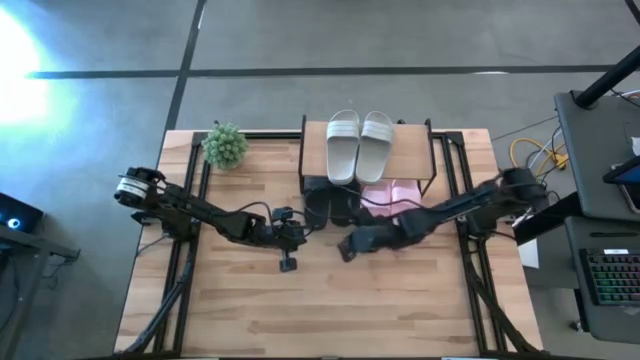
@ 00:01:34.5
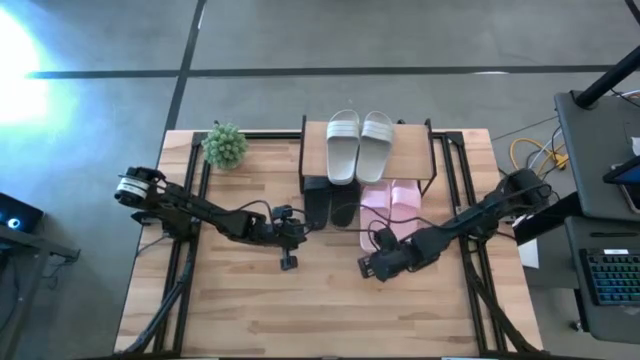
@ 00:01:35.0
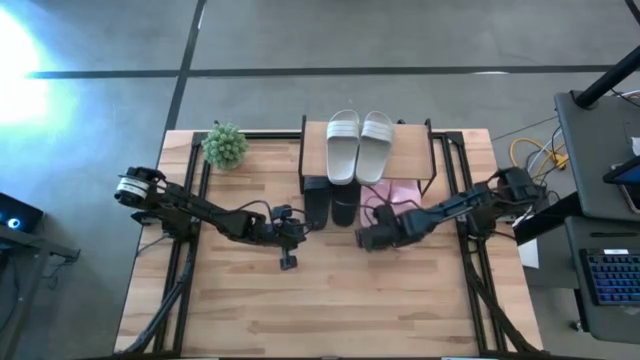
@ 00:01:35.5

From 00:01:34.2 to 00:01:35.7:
Task: Pick and place slides into the shelf
Adjust the left pink slipper under the shelf

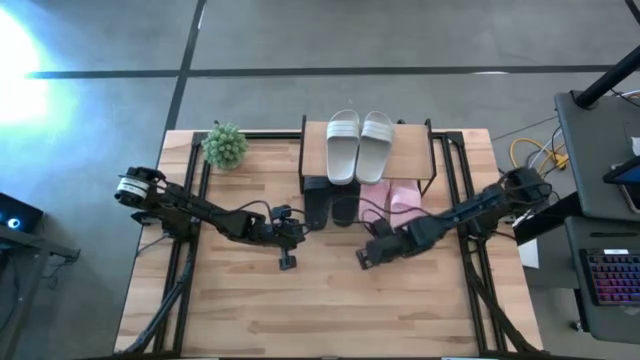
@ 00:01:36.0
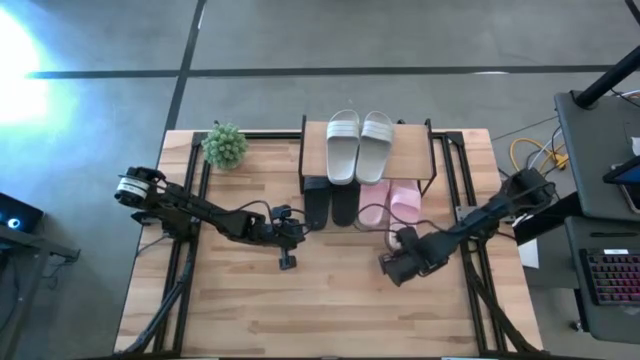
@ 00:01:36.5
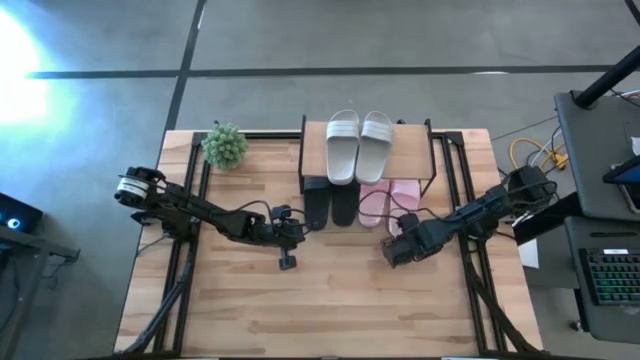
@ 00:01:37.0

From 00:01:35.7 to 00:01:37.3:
Adjust the right pink slipper under the shelf

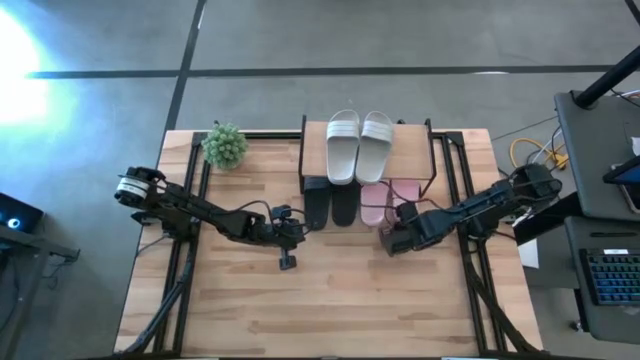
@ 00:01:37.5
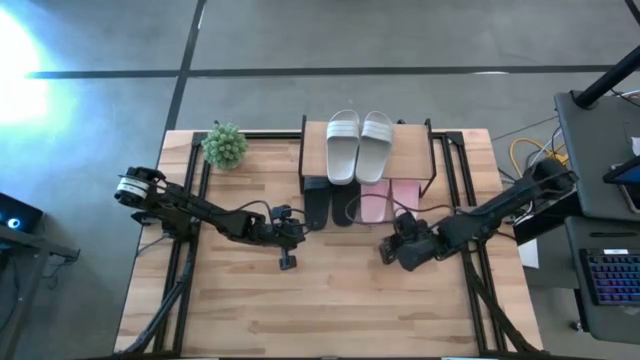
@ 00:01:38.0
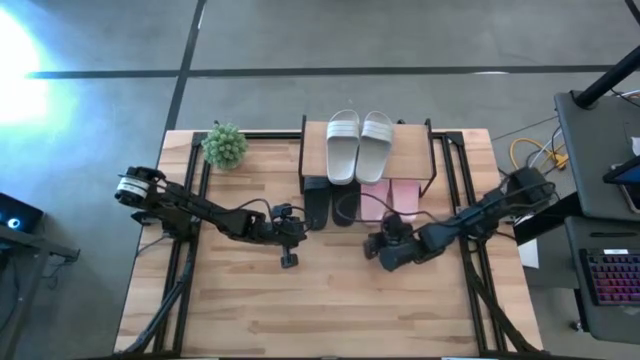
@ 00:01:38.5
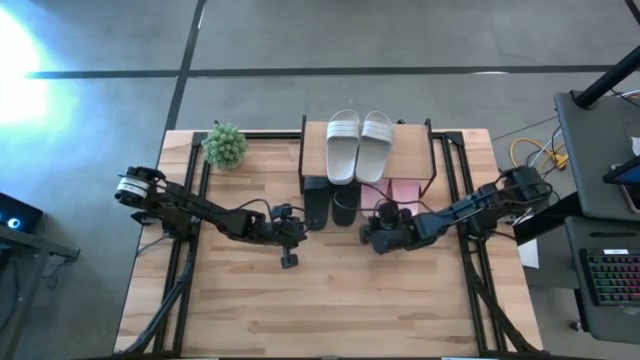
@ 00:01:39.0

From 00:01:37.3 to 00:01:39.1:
Adjust the left pink slipper under the shelf

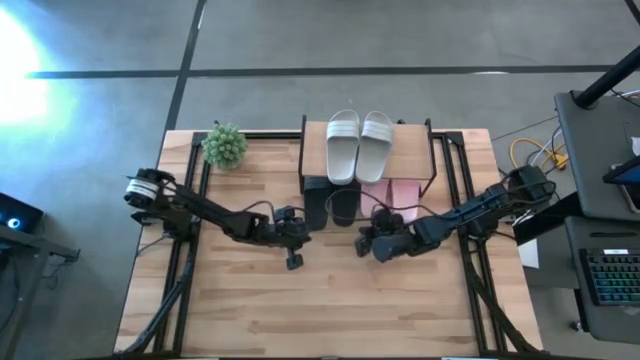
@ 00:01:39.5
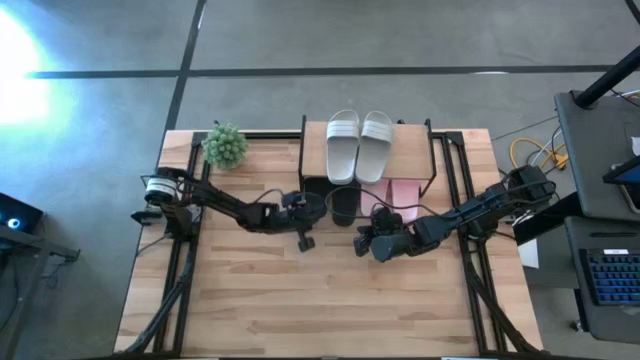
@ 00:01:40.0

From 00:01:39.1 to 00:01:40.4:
Adjust the left black slipper under the shelf

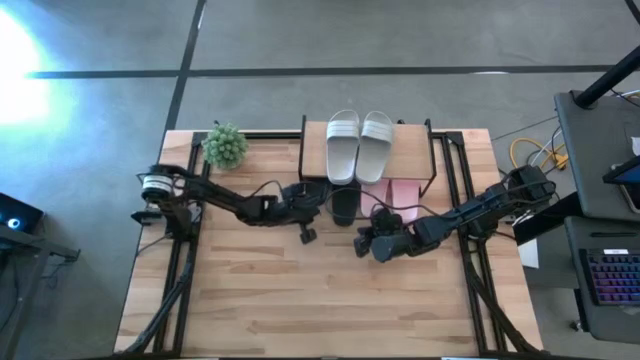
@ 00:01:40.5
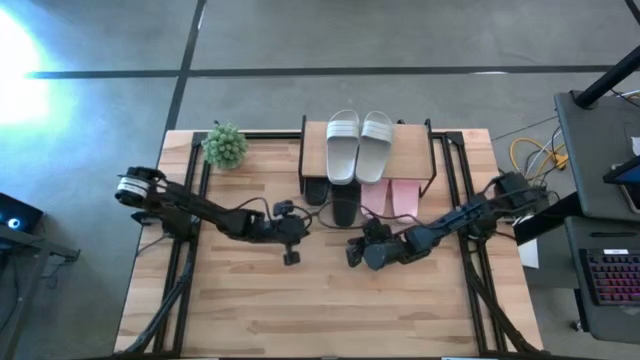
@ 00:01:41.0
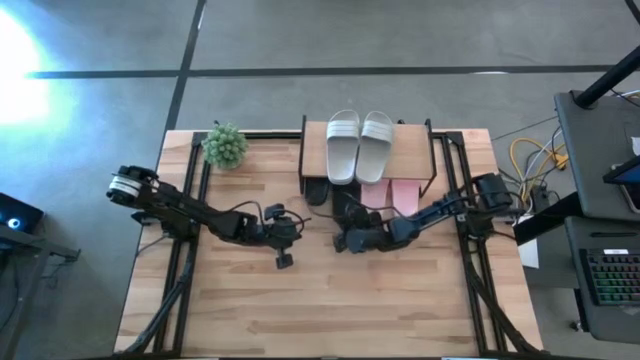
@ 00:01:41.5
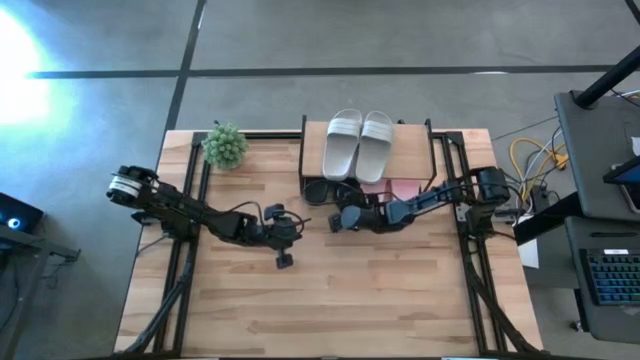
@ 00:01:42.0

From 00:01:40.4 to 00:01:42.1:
Adjust the right black slipper under the shelf

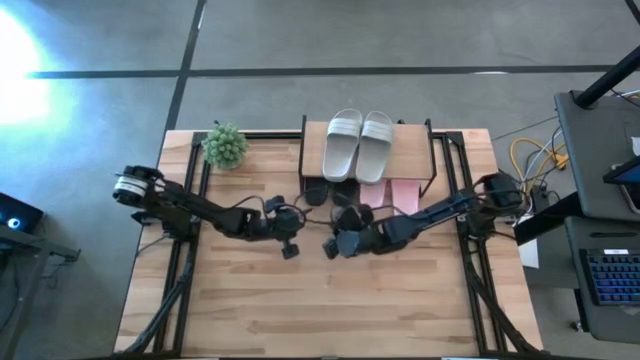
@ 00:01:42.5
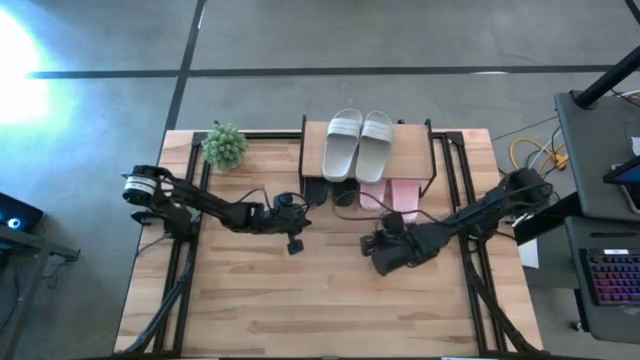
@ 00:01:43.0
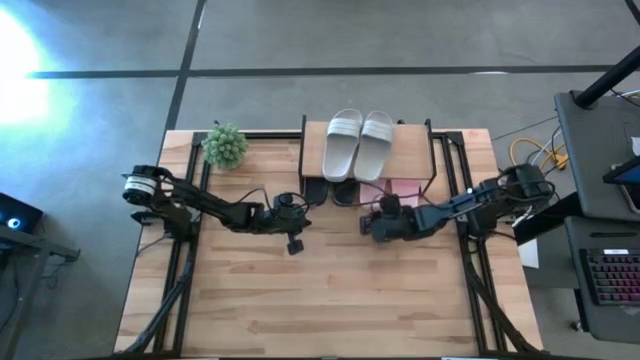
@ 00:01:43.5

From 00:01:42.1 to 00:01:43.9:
Adjust the left pink slipper under the shelf

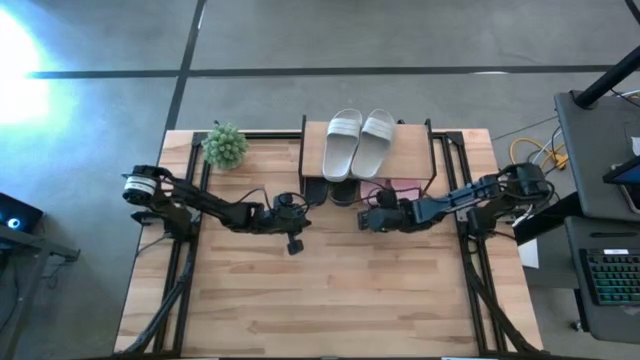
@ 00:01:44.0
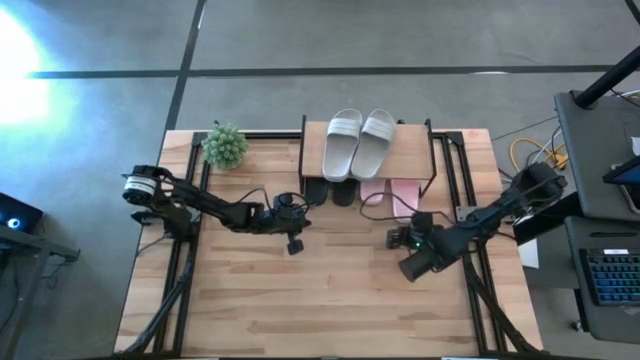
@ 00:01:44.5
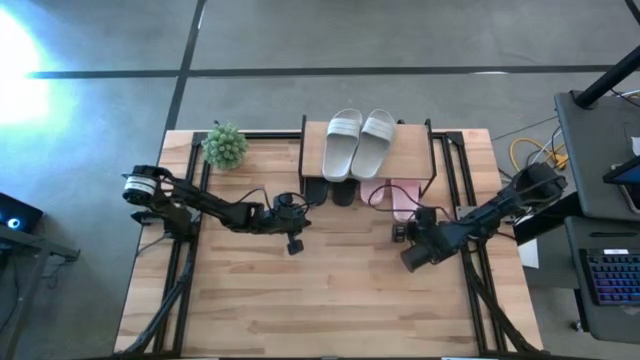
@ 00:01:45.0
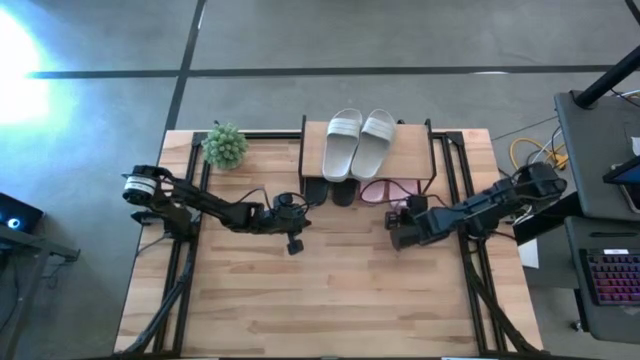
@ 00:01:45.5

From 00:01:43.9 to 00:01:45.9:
Adjust the right pink slipper under the shelf

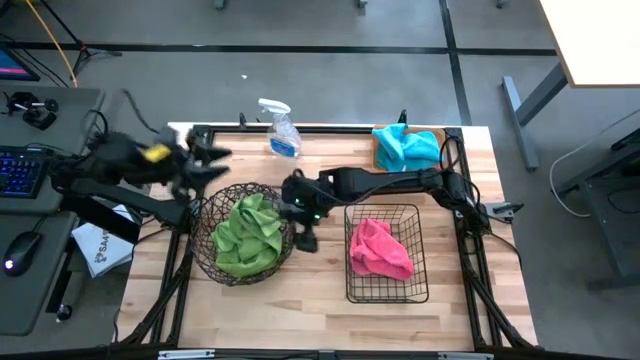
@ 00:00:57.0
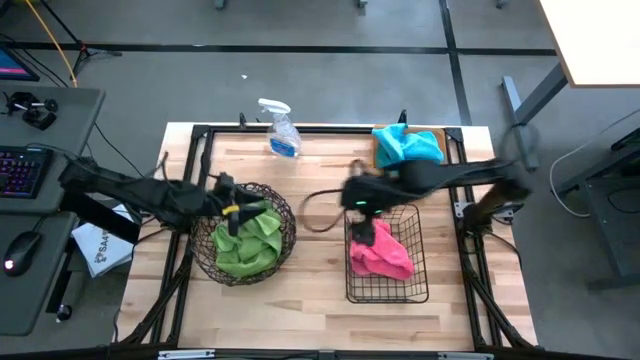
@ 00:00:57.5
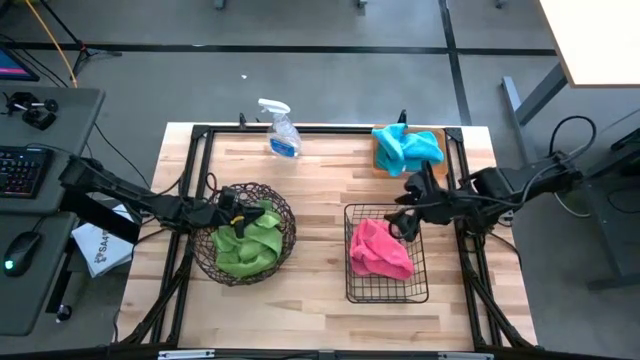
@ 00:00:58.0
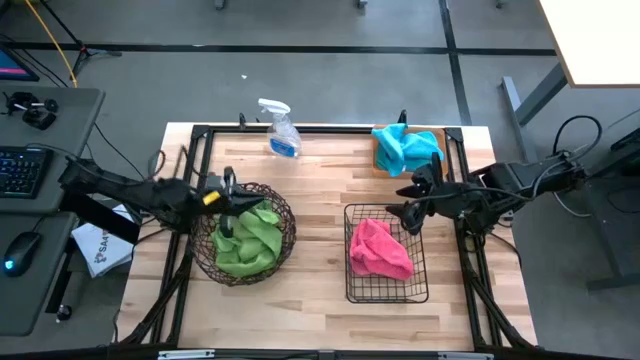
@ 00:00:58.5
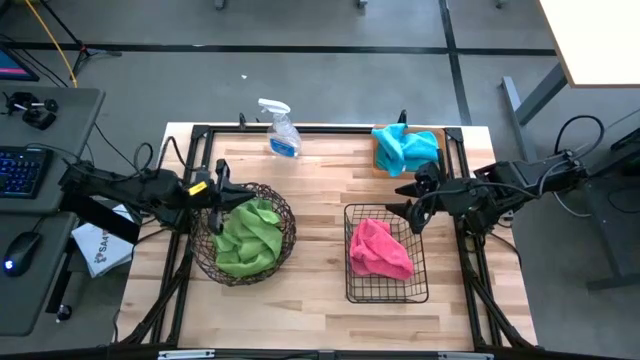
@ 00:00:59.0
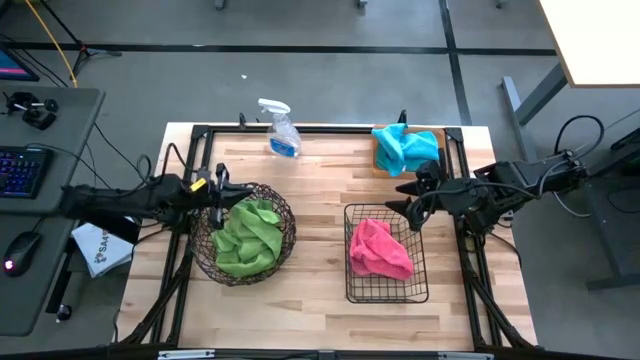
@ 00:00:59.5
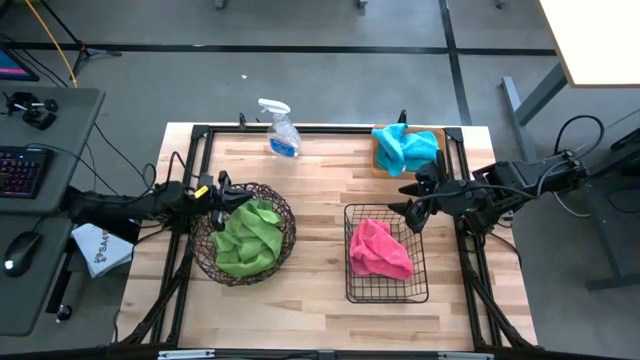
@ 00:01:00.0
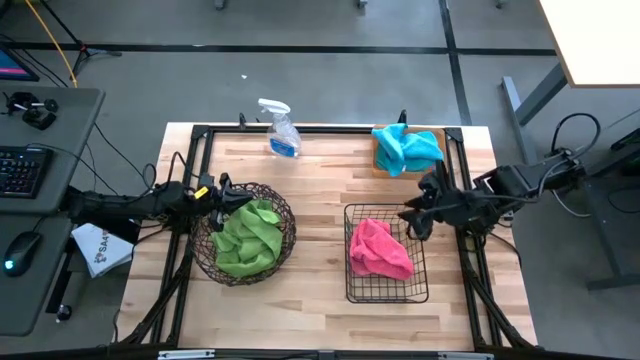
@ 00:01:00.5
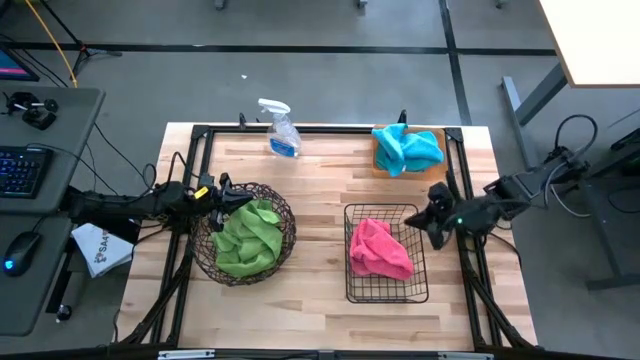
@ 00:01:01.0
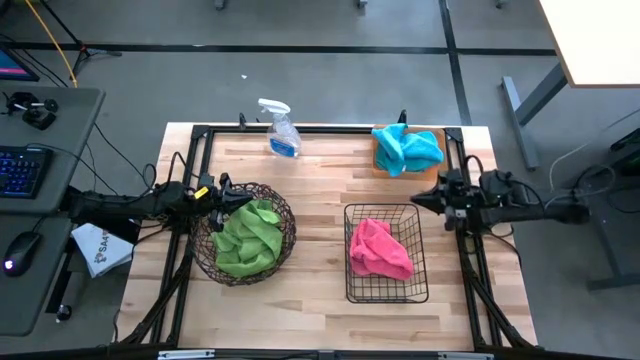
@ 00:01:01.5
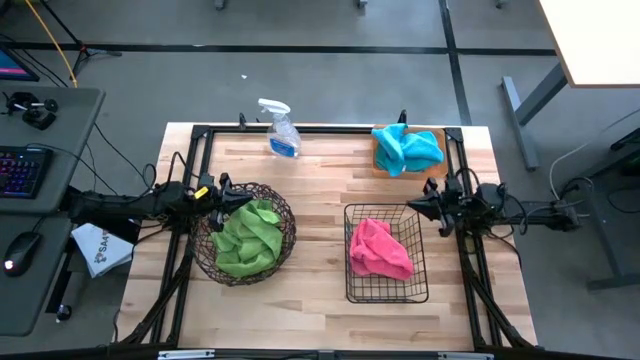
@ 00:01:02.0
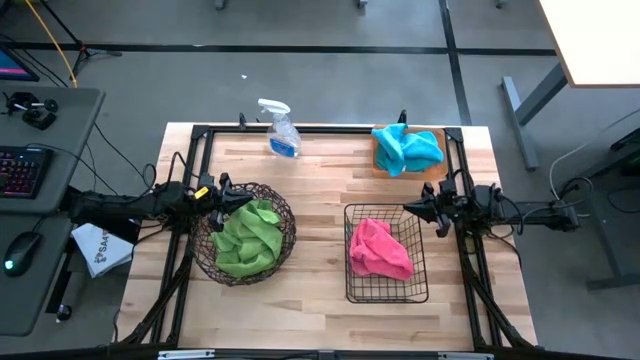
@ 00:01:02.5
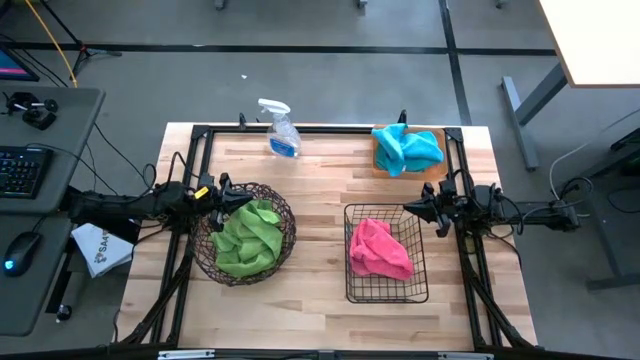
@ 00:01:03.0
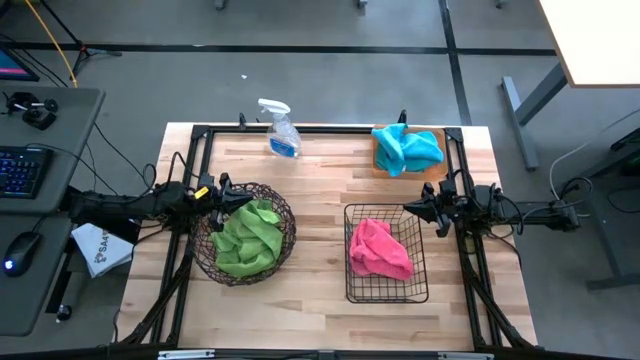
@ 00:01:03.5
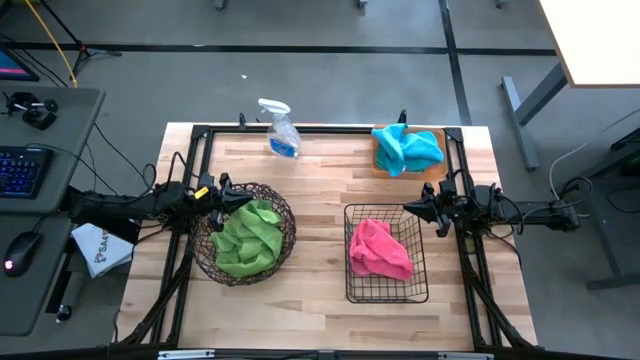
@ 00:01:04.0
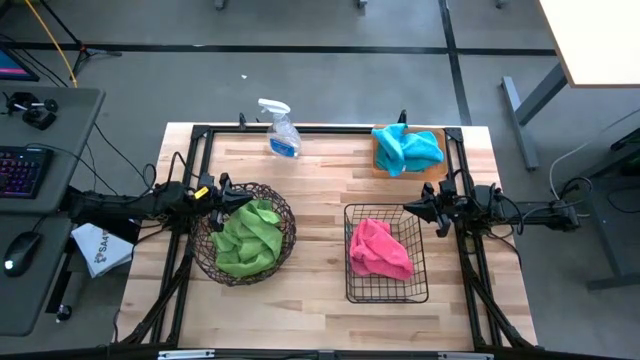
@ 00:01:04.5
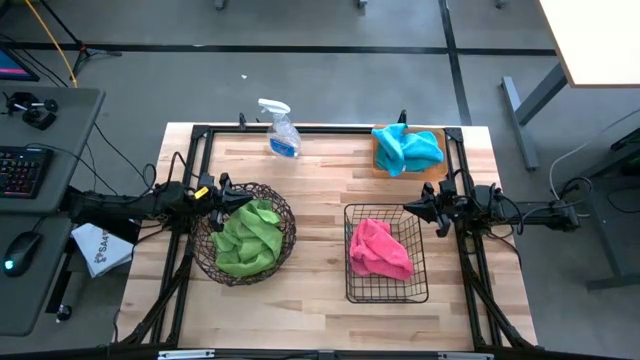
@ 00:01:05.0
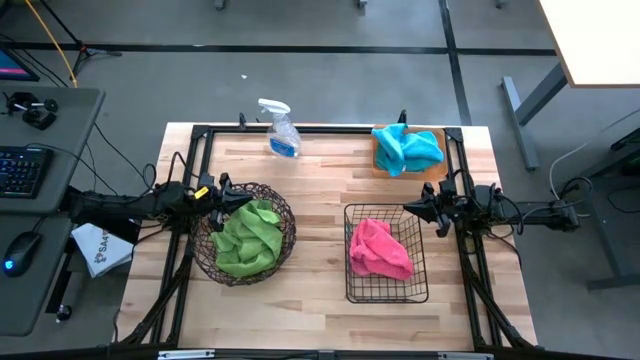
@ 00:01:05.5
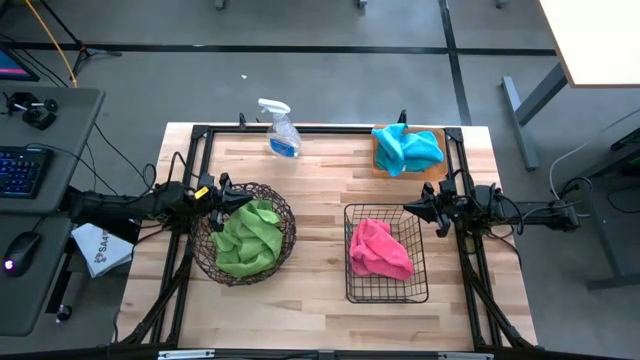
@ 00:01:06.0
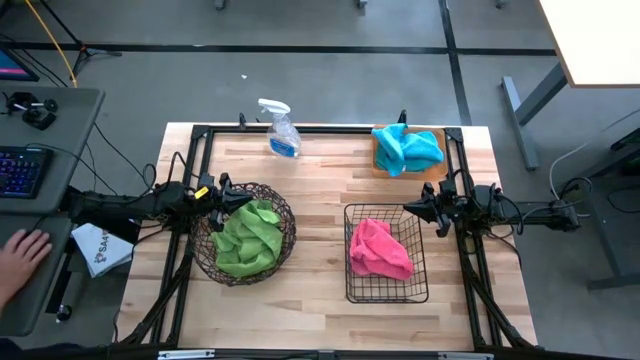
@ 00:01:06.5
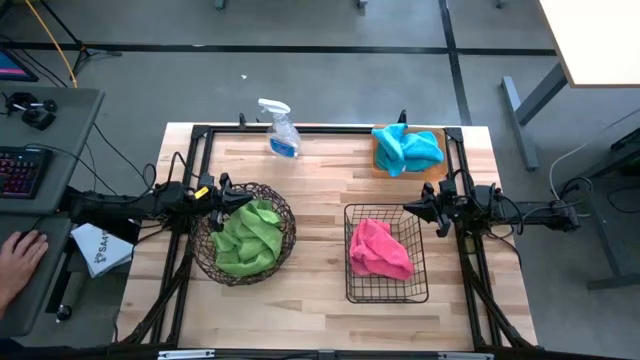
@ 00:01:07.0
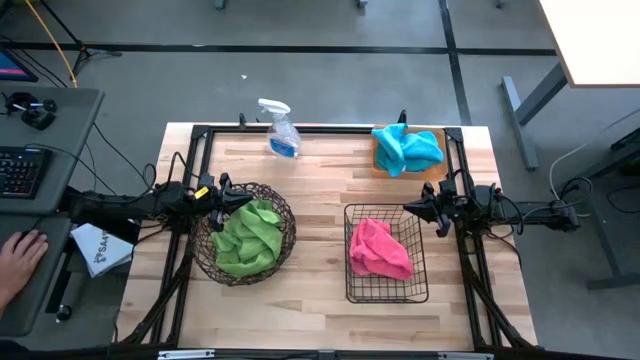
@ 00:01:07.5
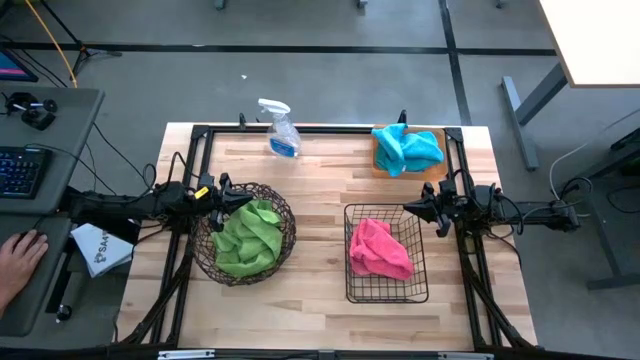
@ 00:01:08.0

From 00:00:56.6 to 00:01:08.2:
Task: Sort microfiber towel by color & place in baskets
Return to Home Position
